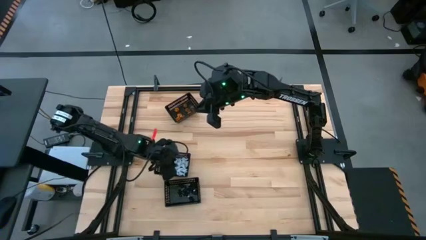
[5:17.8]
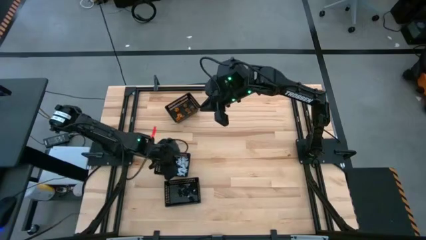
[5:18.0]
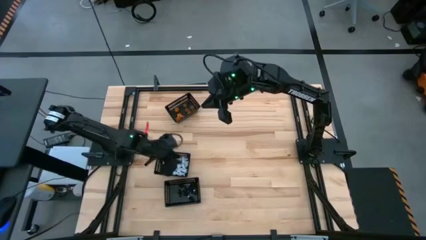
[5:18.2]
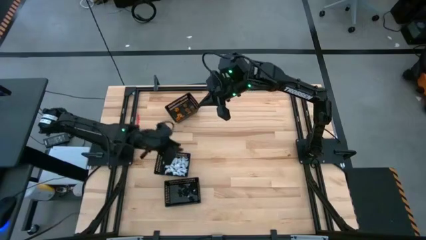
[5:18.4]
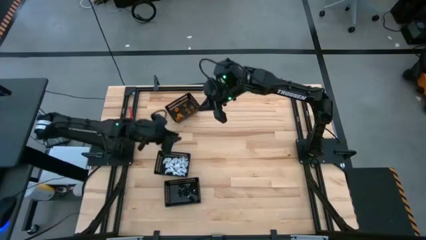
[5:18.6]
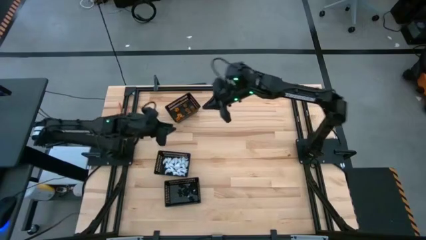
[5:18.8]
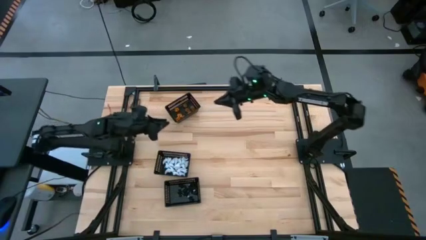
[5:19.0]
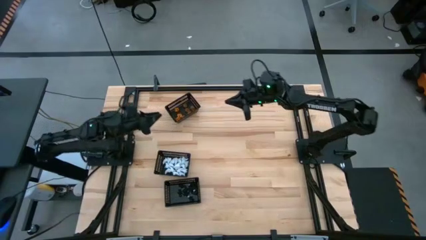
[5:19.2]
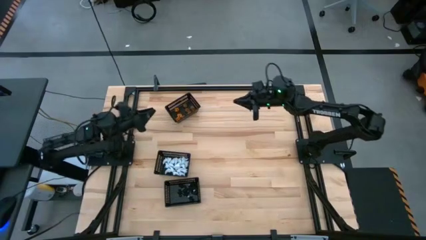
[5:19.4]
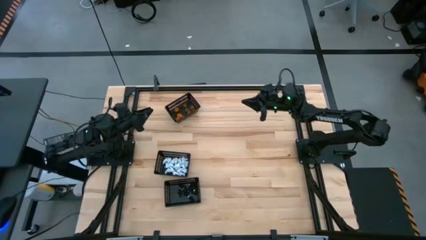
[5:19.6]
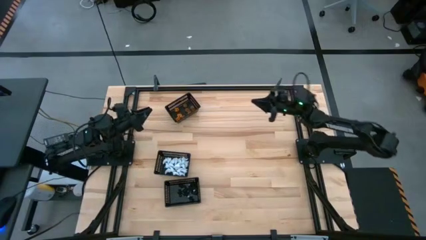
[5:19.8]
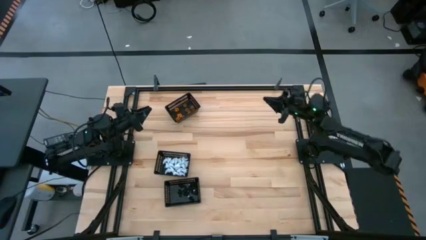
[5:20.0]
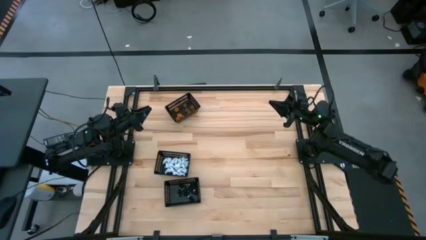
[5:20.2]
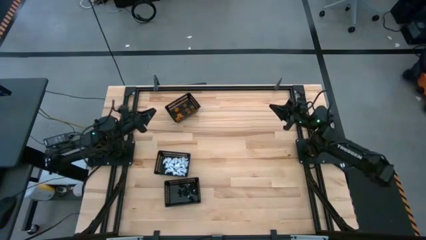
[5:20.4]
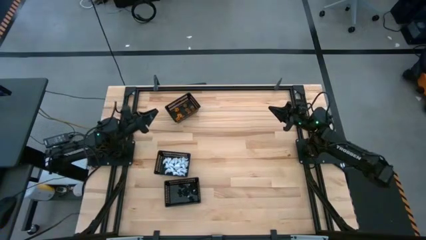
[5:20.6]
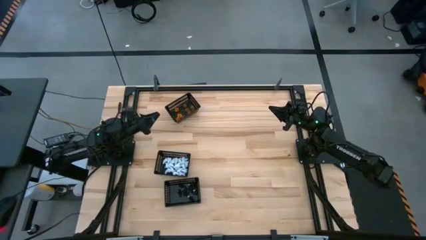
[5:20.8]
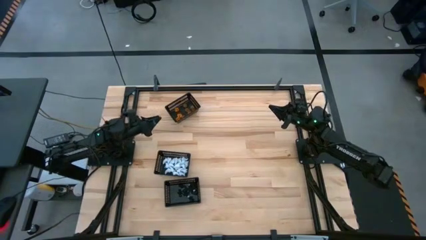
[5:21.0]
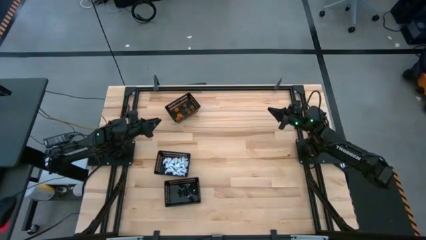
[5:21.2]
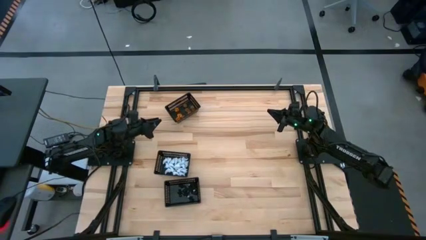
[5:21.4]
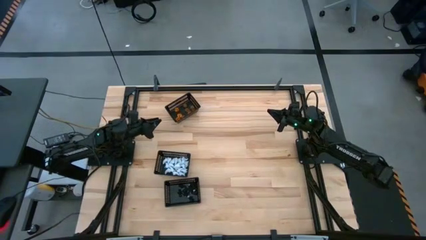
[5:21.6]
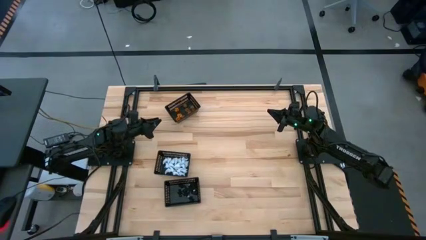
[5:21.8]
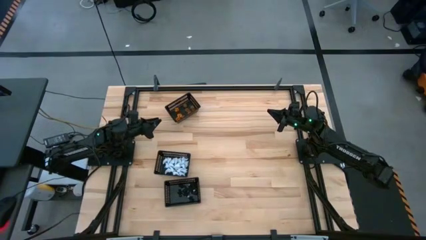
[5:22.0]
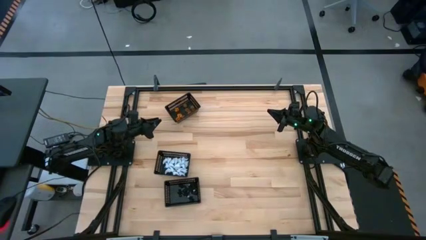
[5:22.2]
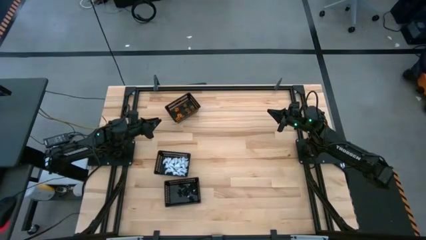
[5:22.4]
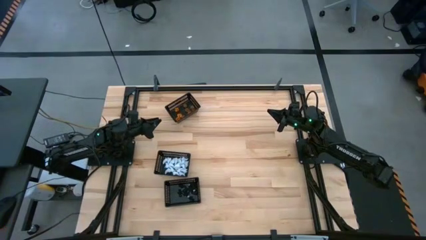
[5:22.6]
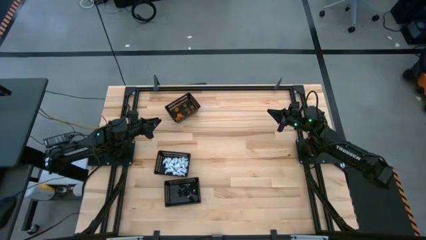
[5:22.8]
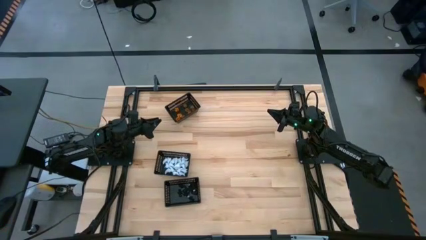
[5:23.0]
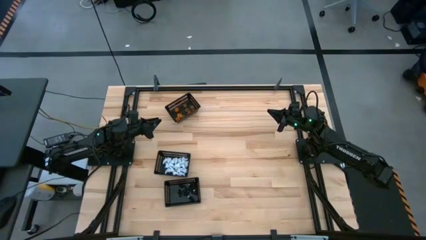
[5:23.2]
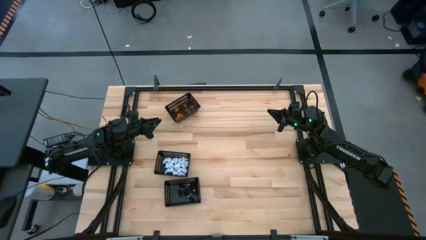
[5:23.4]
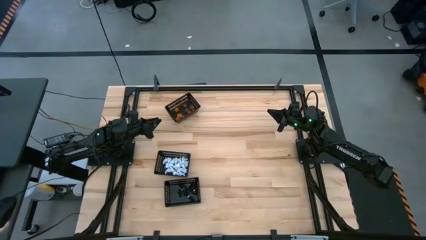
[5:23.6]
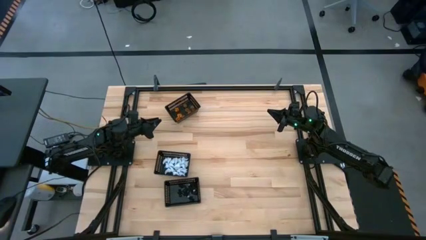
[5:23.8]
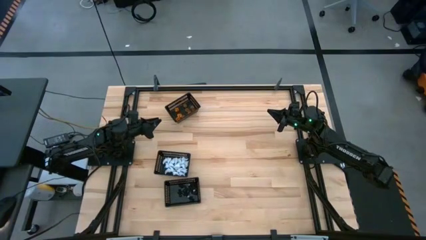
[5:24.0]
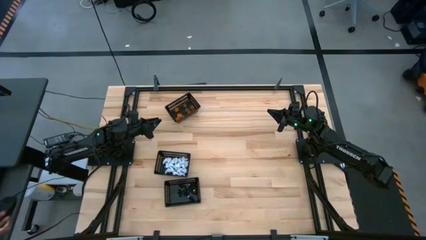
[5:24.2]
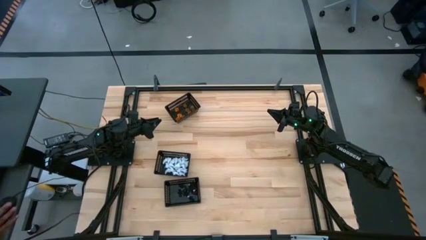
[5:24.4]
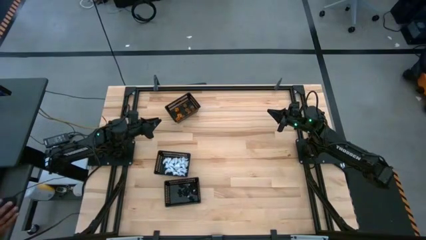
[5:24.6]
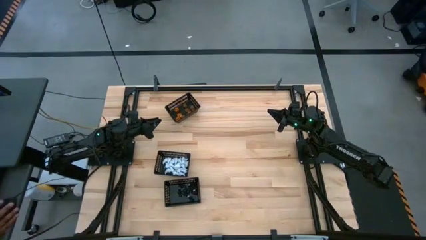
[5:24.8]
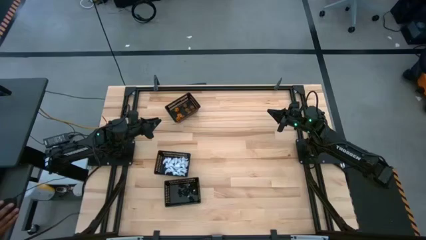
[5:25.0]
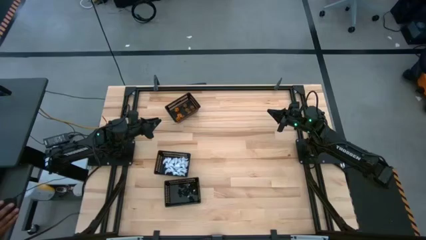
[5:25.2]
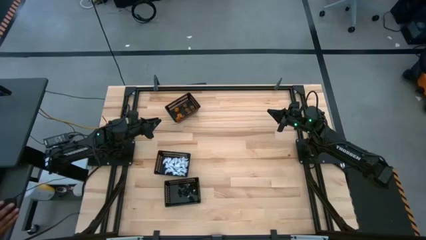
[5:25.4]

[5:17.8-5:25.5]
Task: Sort Halloween decoration
Return to Home Position

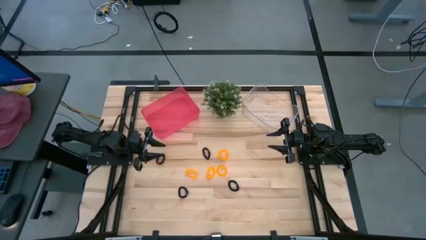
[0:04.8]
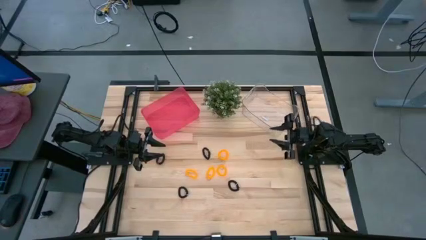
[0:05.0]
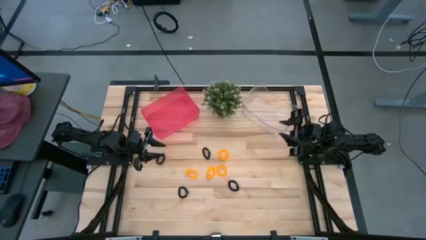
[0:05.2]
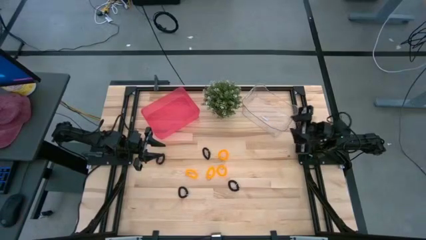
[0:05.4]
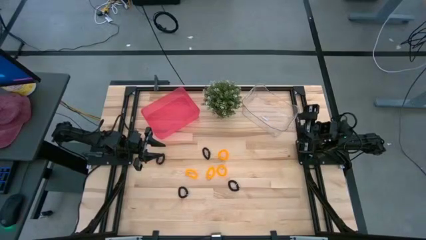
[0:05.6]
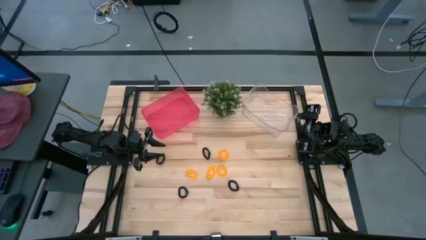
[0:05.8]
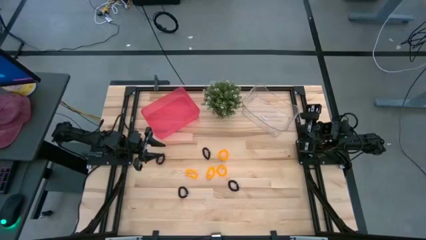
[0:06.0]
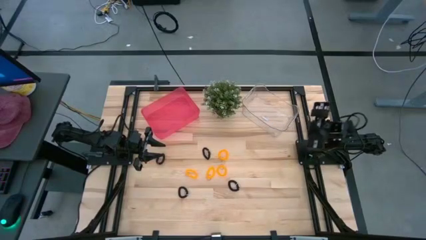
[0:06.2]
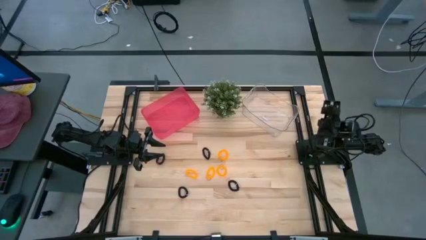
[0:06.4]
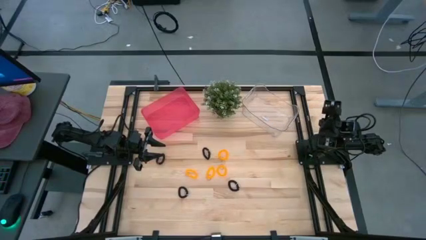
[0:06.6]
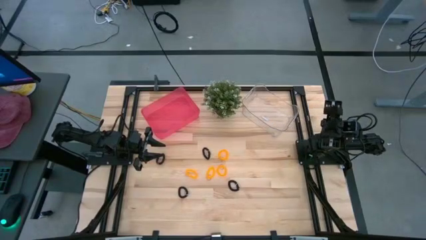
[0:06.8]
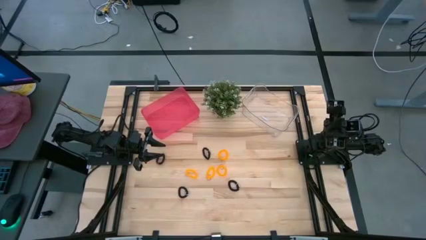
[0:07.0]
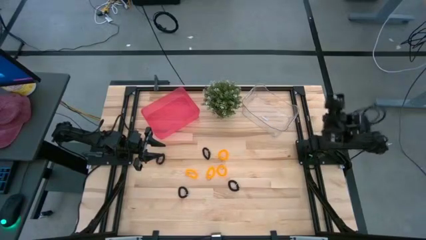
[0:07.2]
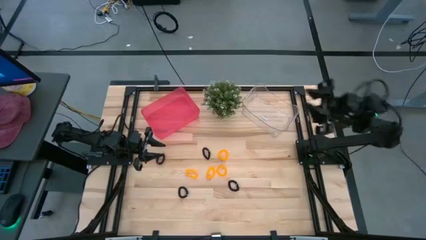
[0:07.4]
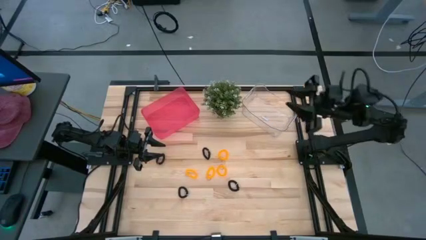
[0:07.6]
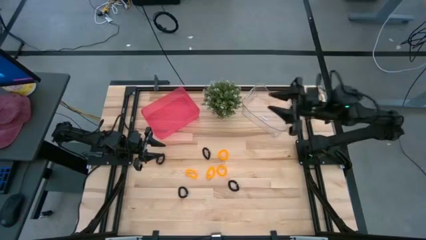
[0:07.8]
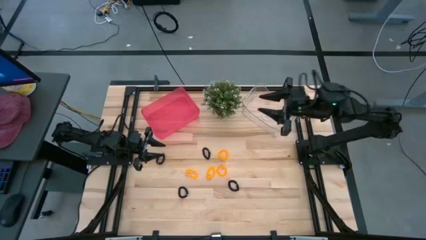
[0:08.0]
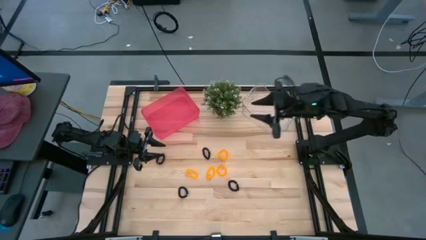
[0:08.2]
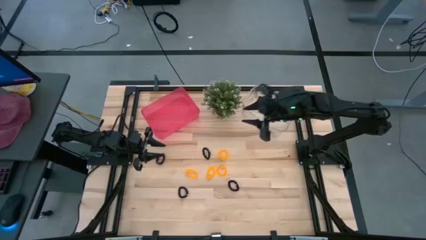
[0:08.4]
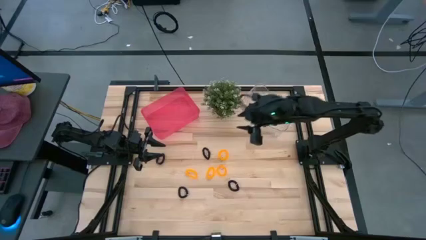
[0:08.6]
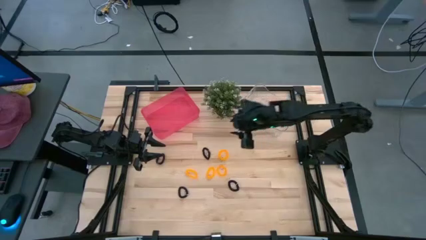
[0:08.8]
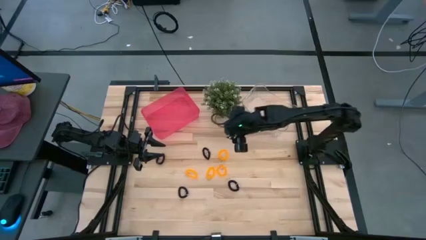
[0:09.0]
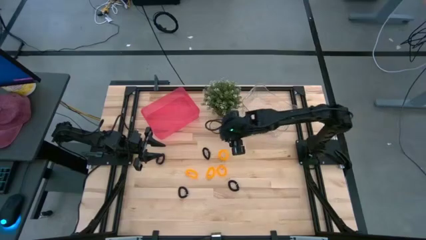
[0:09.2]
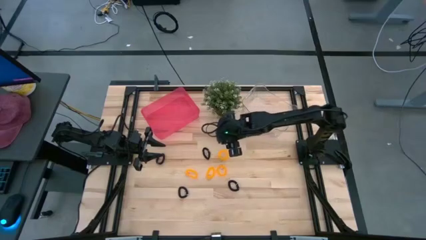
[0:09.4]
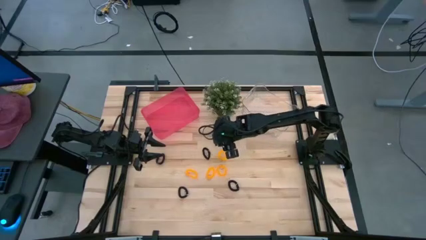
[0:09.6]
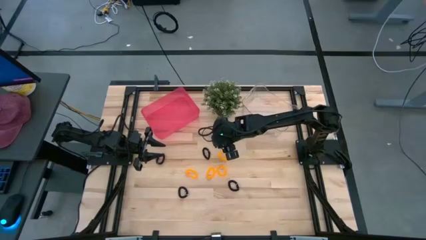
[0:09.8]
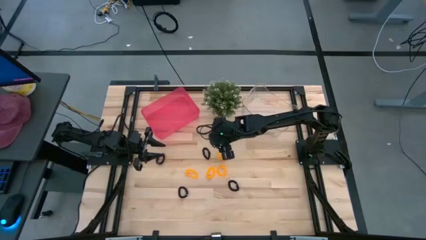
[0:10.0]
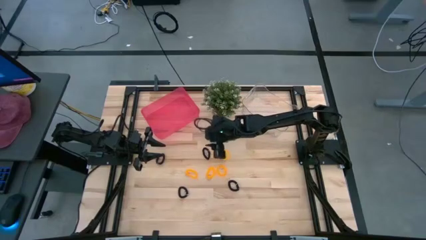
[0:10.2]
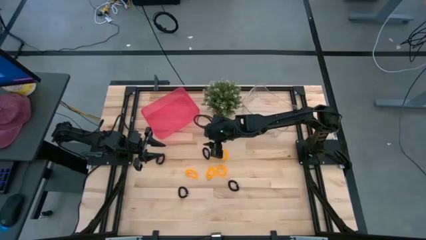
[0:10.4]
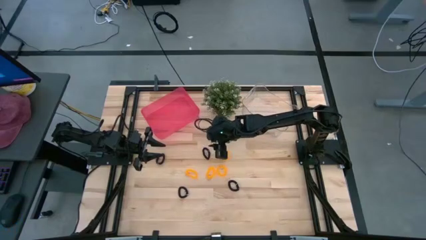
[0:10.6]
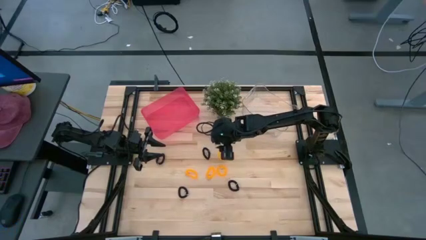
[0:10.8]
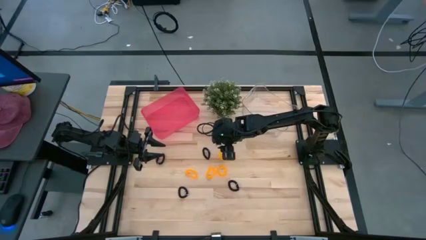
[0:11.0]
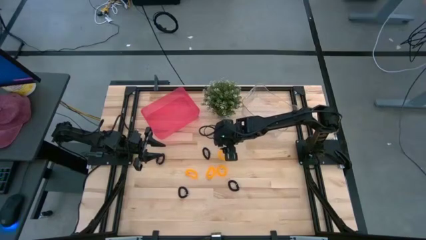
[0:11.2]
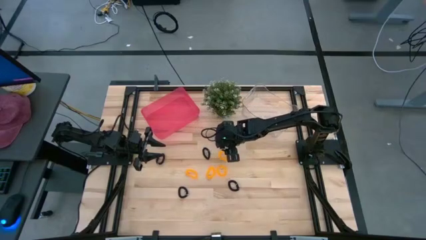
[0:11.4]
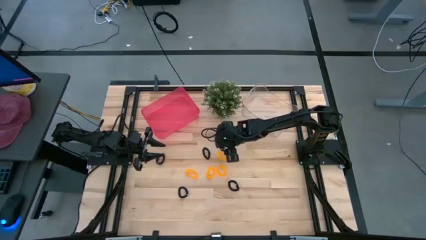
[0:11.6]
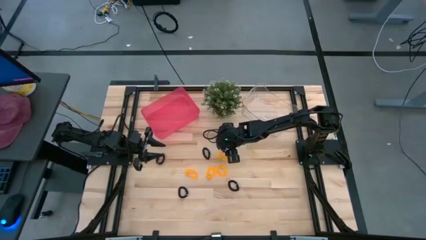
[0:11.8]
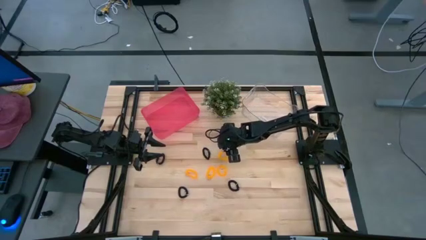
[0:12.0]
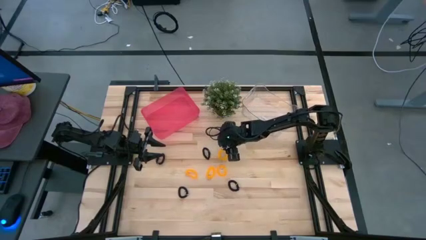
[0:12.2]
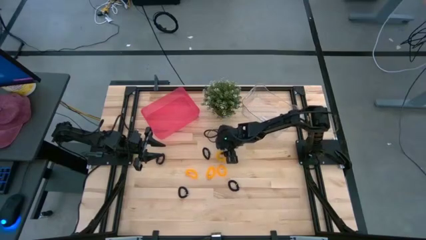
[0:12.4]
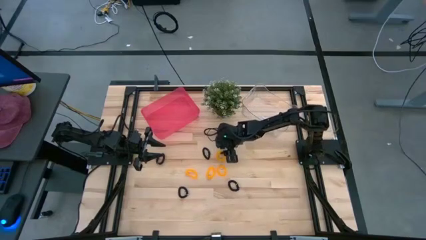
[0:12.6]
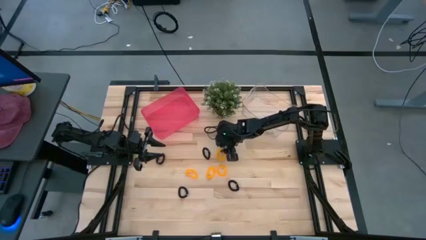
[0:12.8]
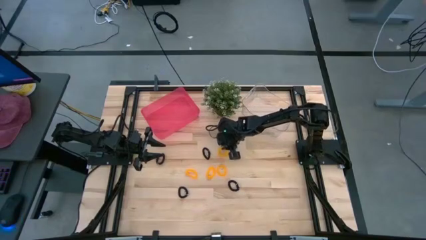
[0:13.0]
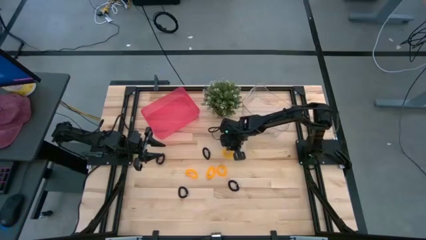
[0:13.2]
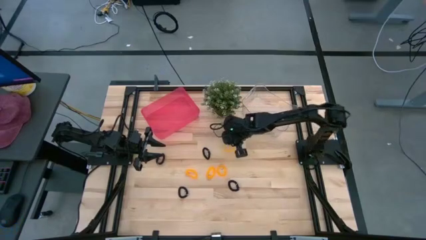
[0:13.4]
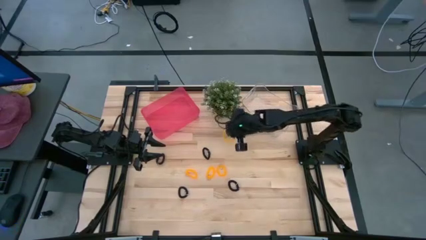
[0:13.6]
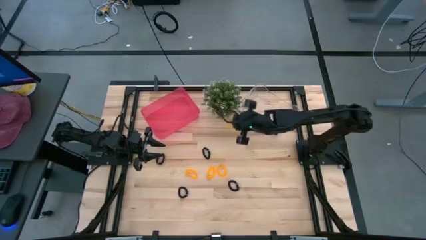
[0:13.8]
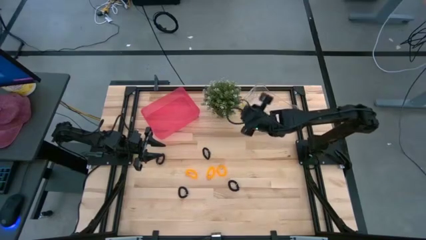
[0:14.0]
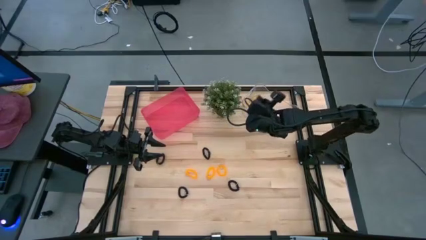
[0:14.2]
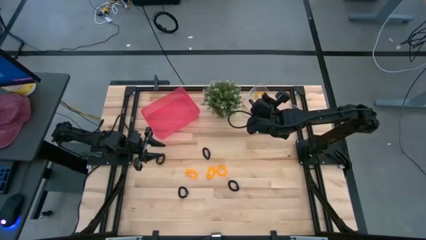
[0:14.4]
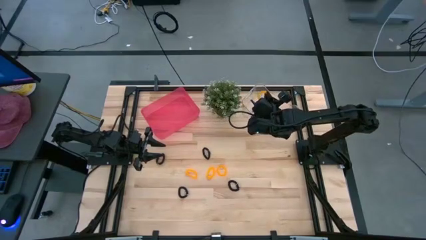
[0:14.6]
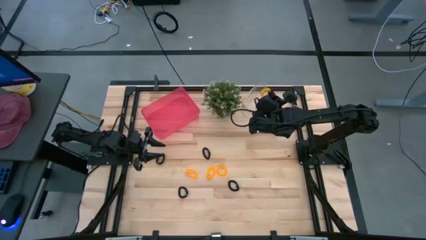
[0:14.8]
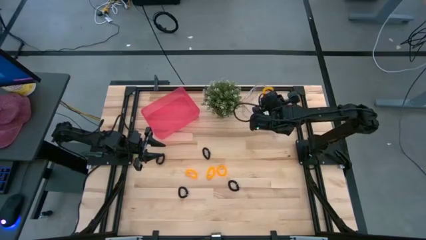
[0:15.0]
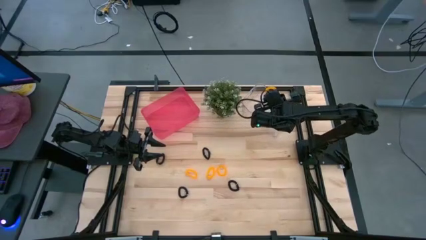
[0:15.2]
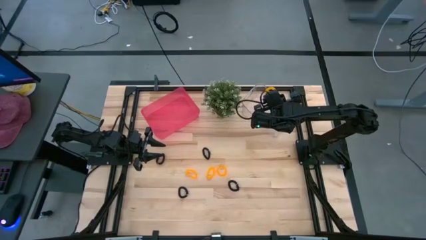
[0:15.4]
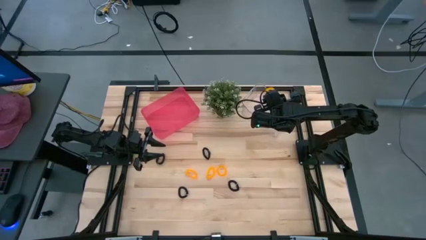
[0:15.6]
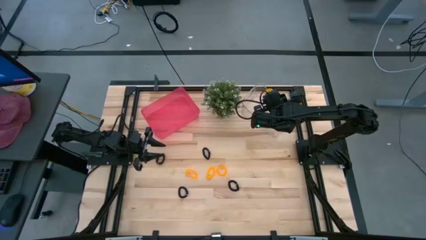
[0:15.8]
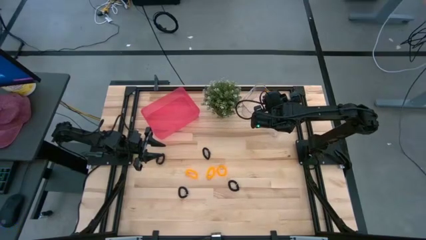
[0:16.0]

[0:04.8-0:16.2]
Task: Sort spring keychains
Put the yellow spring keychain into the transparent bin
